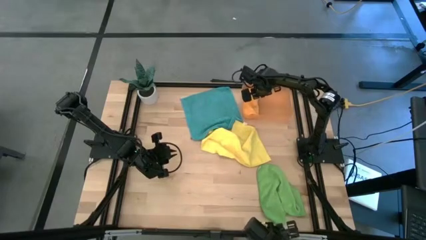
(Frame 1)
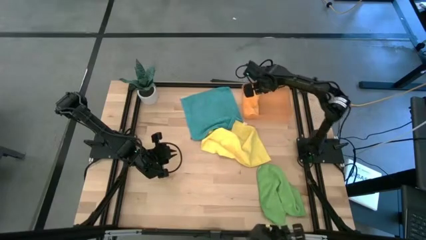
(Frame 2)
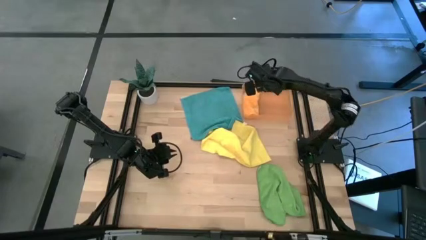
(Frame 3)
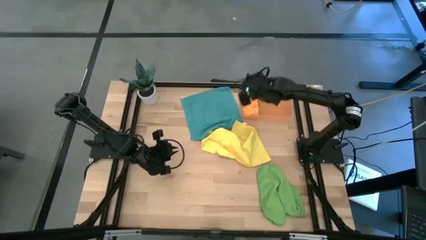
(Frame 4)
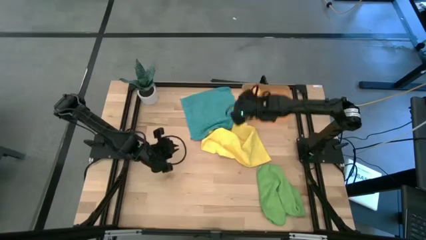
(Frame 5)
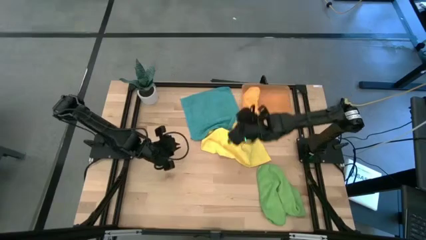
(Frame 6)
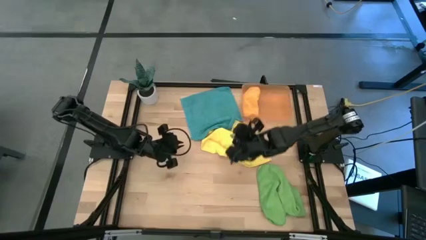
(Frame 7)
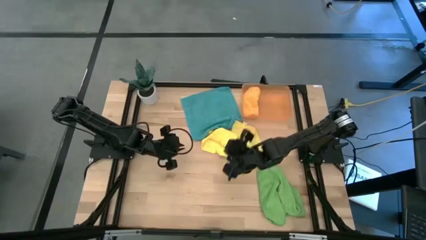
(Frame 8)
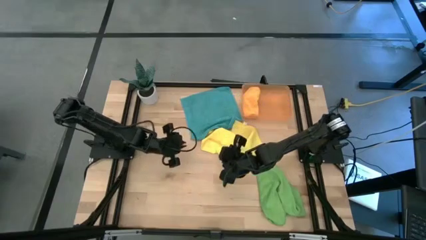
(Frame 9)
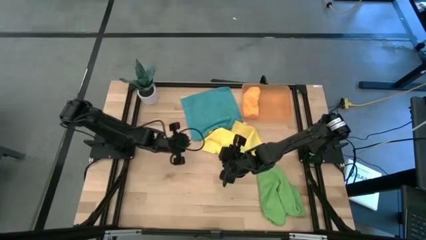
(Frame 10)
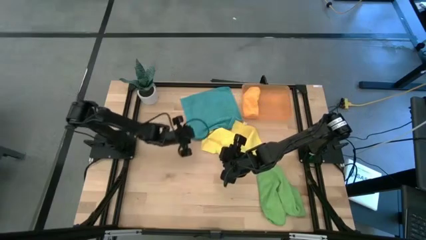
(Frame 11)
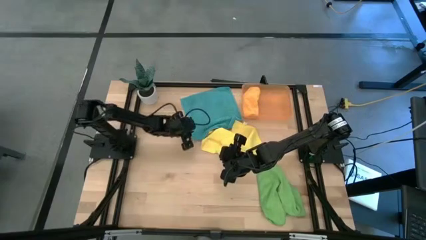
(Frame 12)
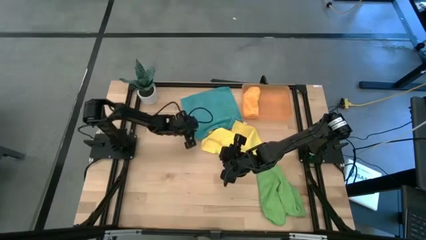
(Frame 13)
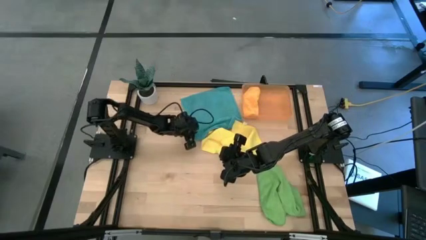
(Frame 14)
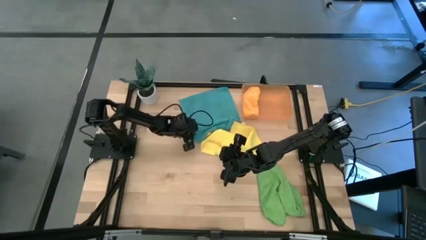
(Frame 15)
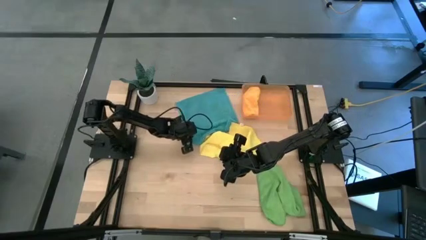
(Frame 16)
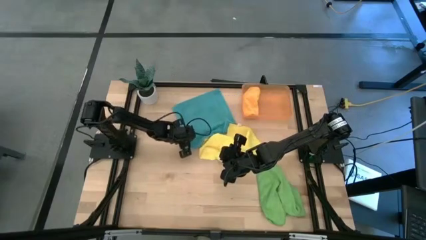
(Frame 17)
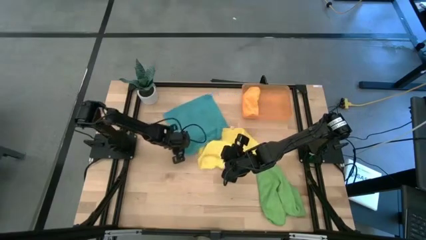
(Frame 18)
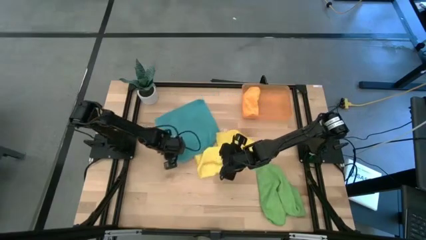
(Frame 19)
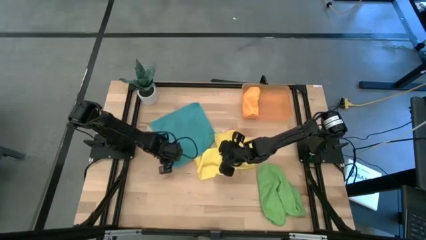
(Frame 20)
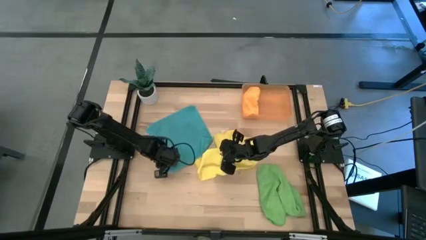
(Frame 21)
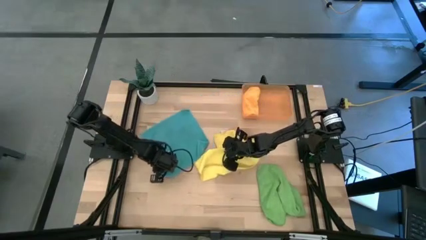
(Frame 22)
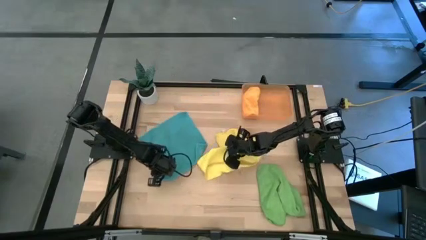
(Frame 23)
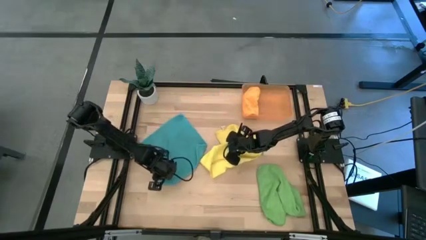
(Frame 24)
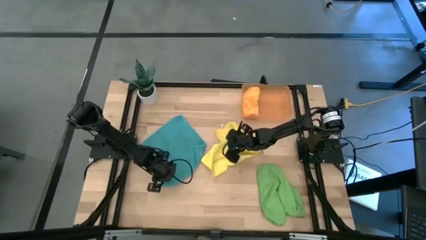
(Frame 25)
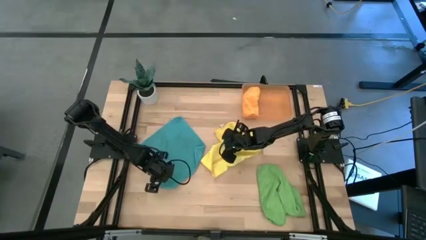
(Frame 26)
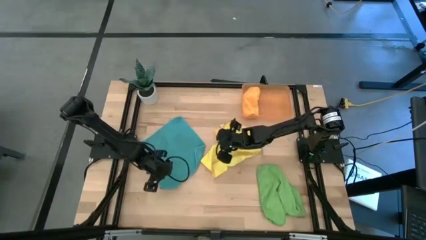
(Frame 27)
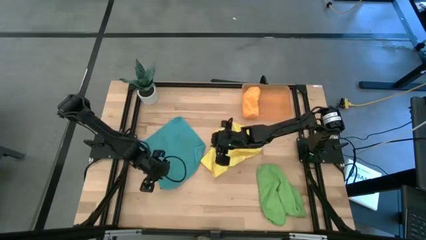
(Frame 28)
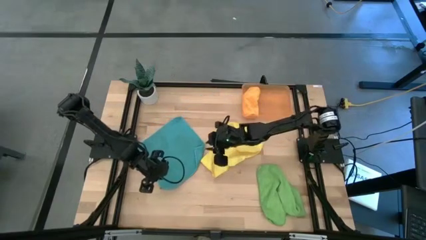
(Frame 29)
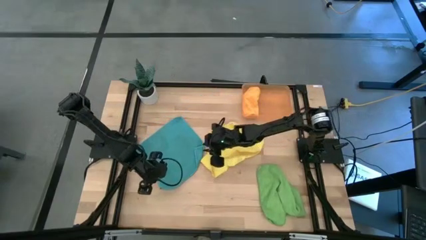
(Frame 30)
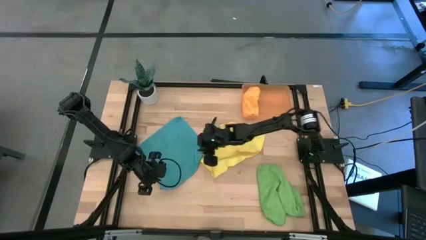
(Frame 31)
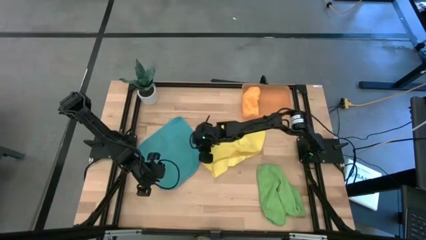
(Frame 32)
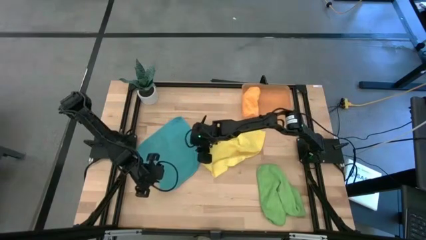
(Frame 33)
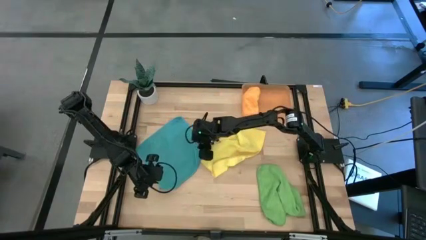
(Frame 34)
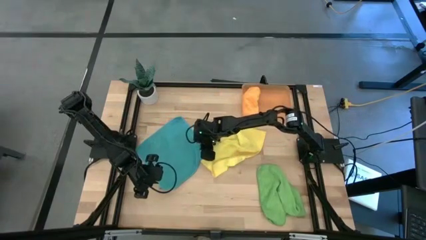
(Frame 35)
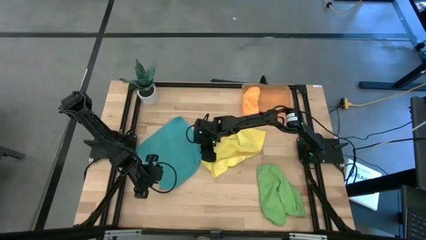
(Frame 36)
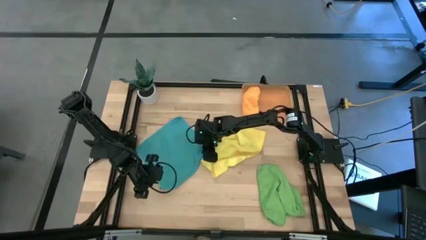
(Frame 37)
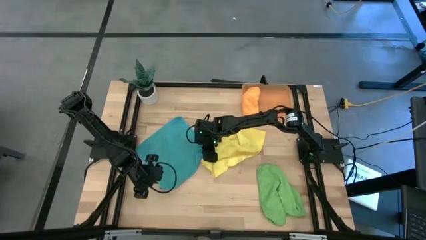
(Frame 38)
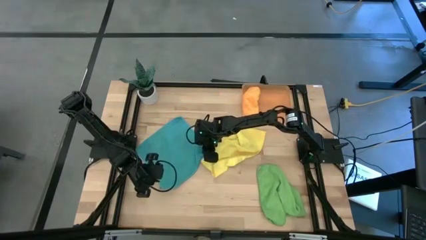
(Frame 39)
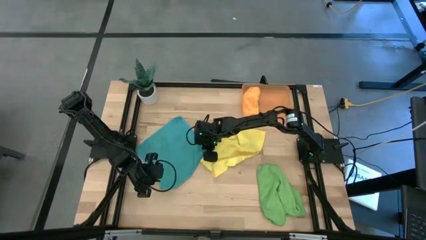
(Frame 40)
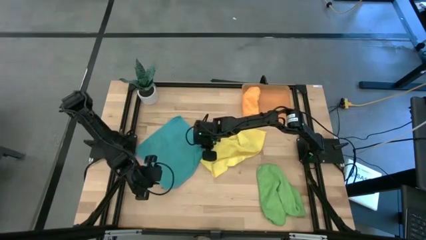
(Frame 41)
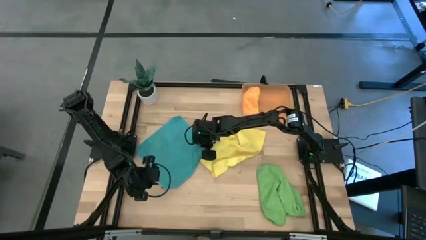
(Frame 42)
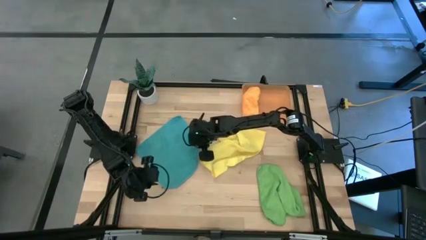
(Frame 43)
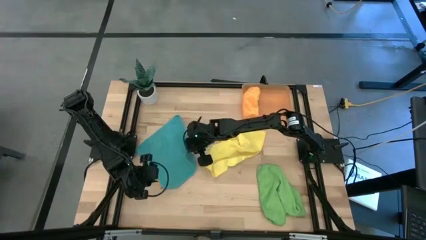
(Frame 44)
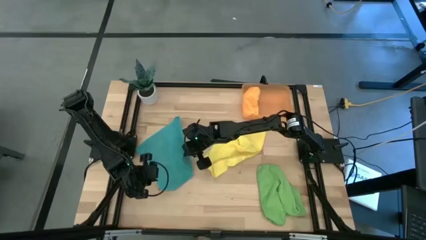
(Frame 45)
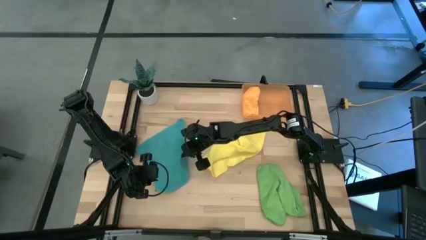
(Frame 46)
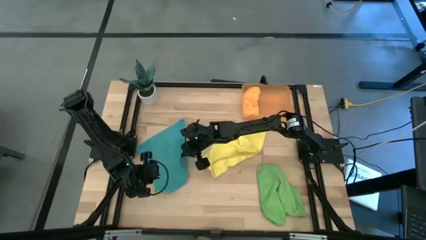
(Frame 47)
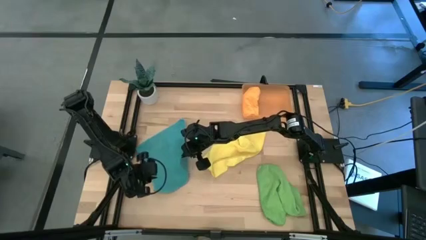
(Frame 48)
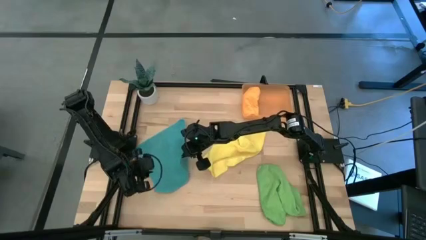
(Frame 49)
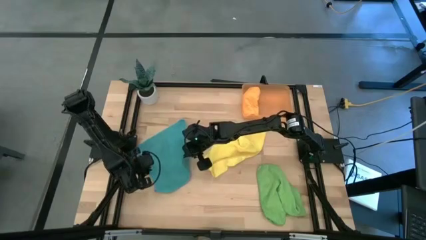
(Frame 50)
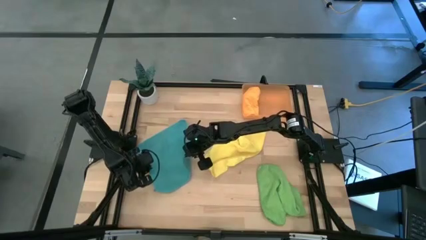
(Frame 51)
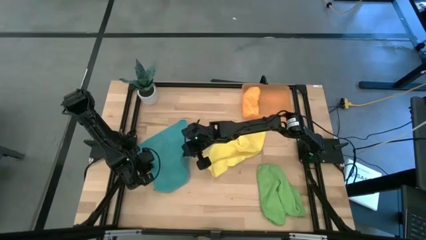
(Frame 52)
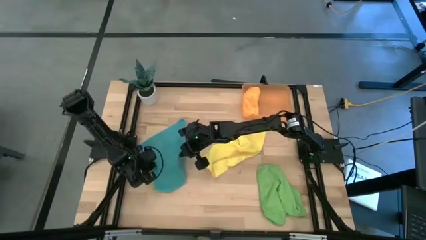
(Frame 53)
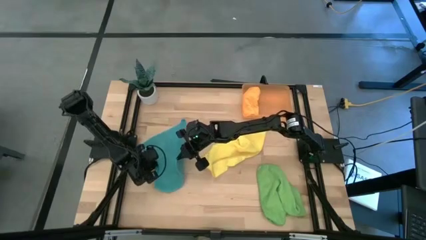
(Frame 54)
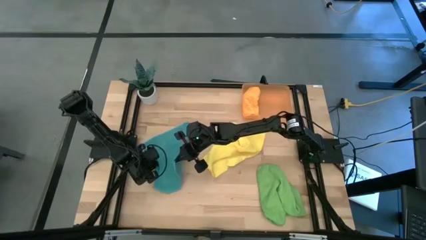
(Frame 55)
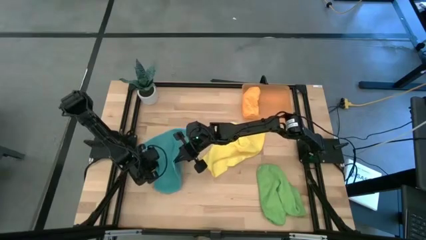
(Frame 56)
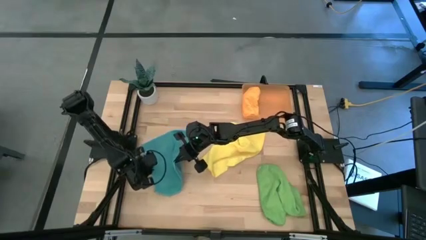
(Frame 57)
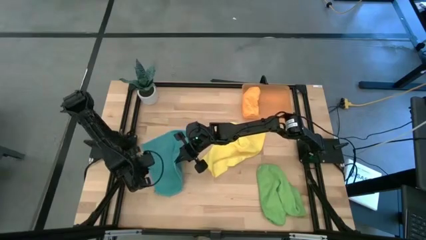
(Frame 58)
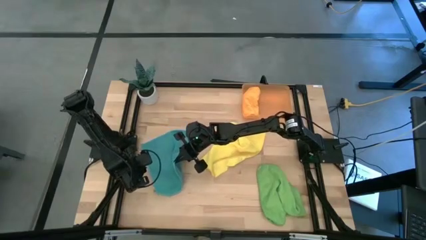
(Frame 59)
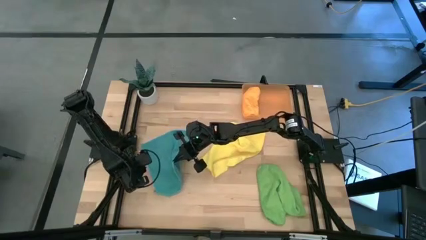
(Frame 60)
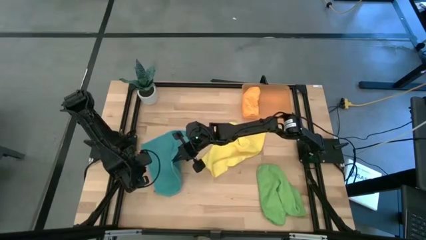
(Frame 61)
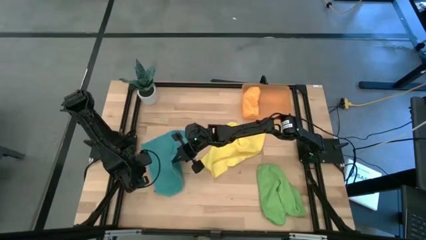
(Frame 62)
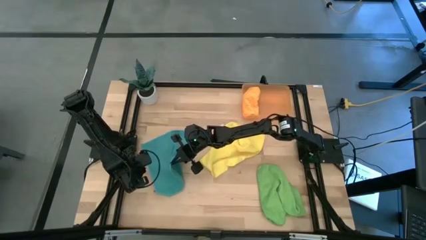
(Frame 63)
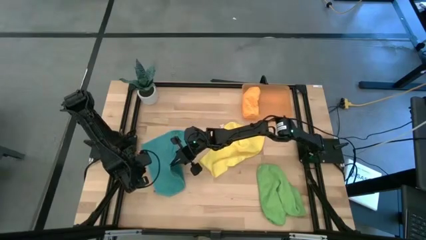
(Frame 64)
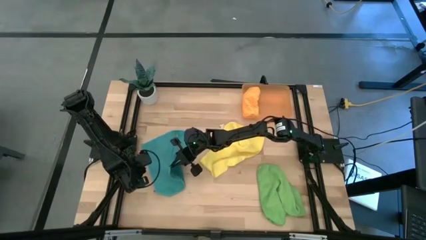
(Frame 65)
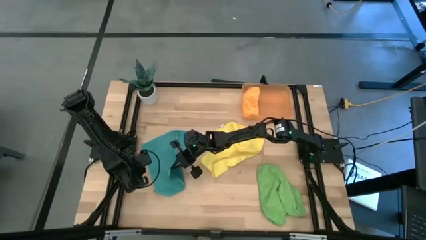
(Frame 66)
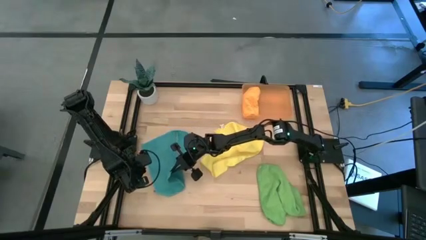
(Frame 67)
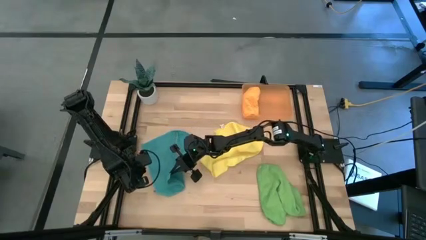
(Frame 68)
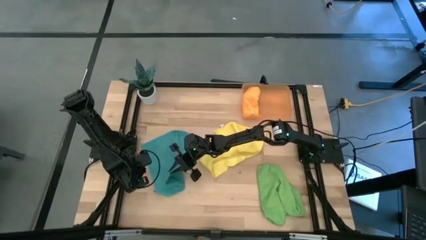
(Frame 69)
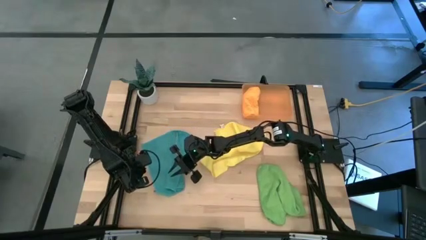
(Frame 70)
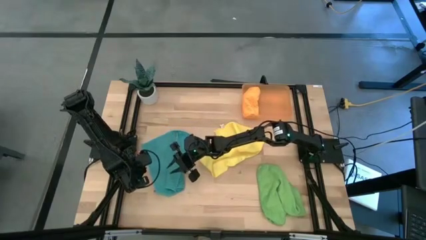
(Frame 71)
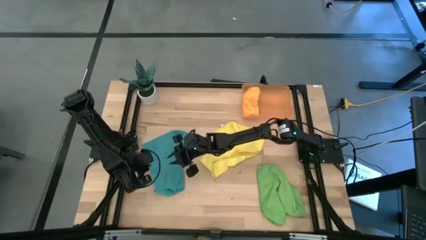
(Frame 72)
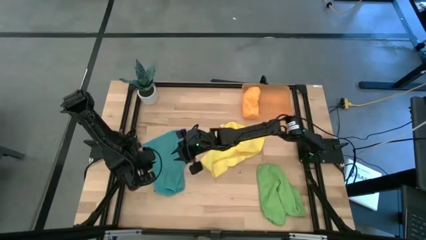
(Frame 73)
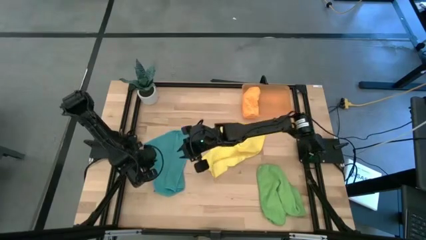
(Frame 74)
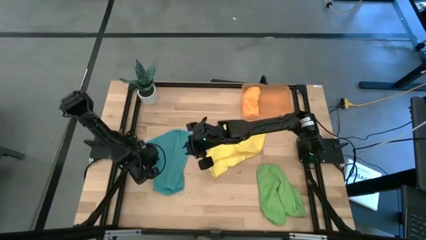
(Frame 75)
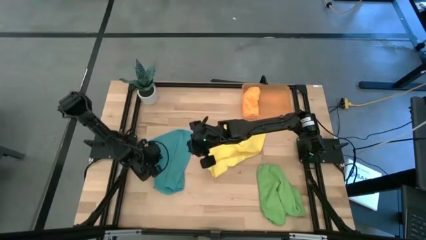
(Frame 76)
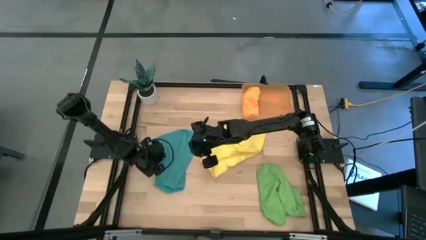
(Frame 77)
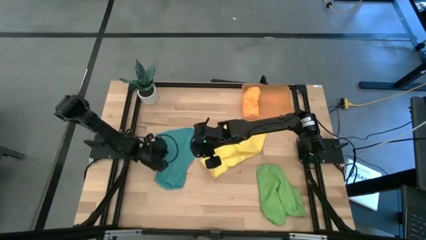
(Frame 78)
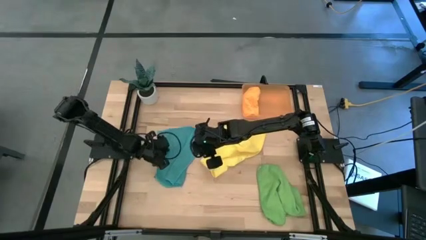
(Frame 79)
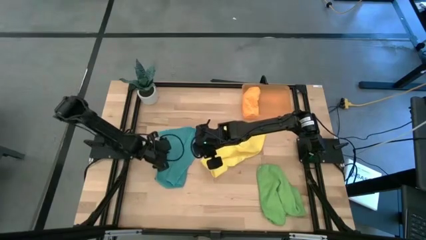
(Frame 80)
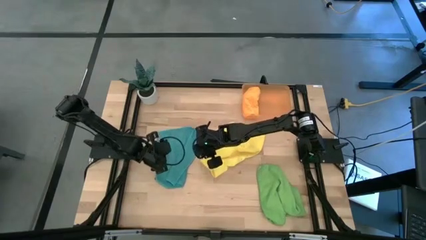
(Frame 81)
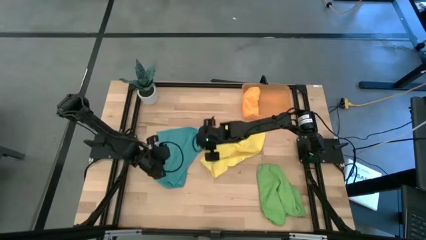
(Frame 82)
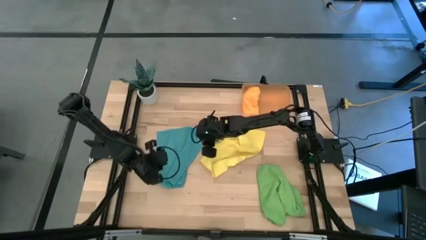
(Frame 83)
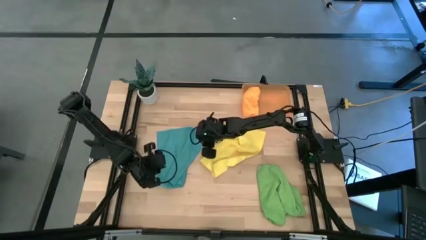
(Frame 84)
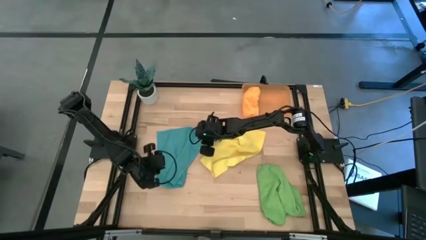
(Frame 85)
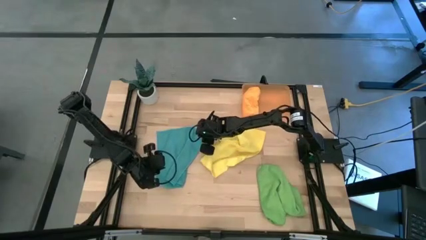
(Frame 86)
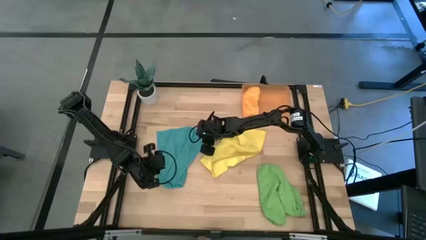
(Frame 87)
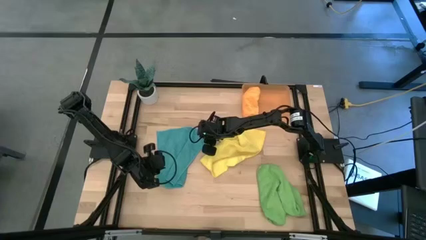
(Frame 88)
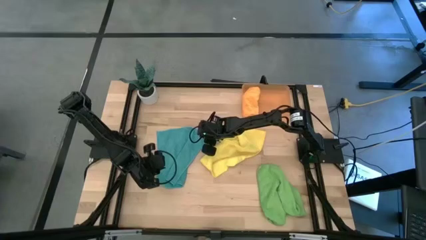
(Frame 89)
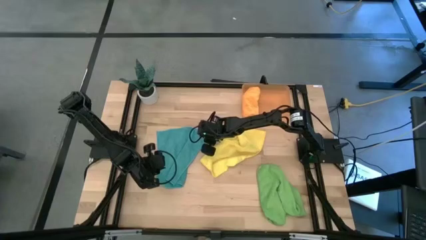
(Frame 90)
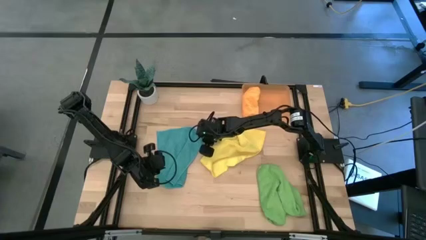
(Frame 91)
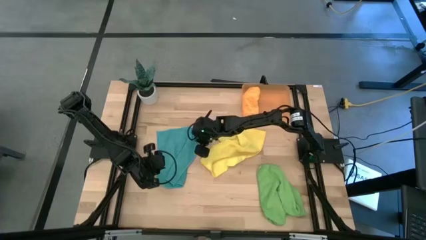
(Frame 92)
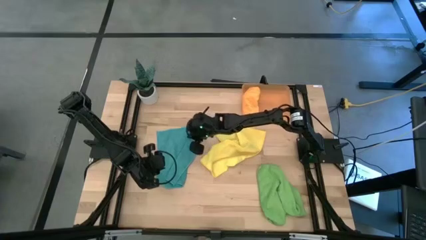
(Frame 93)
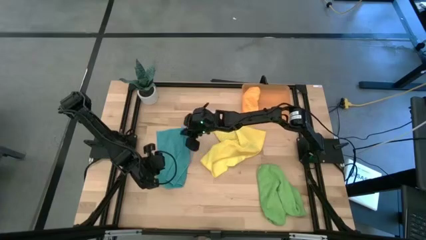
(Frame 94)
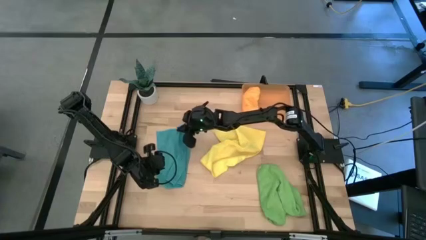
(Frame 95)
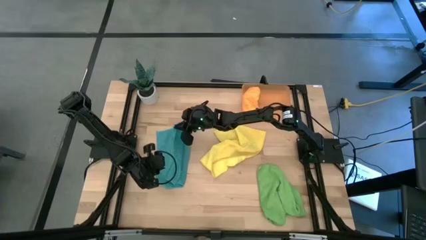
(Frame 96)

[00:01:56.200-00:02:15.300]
Task: Roll microfiber towels into tight, uniform cylinder then place into a basket
Roll the blue microfiber towel
